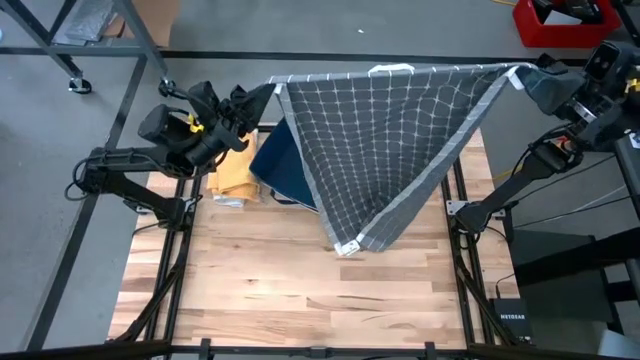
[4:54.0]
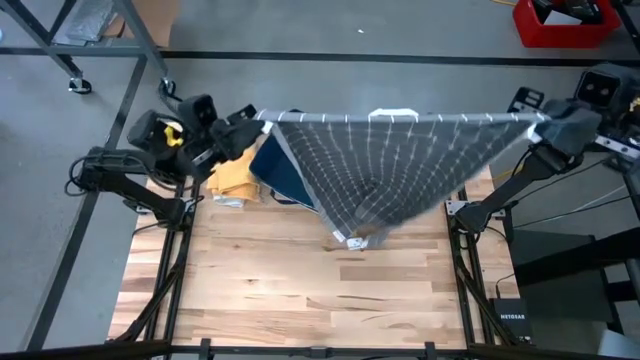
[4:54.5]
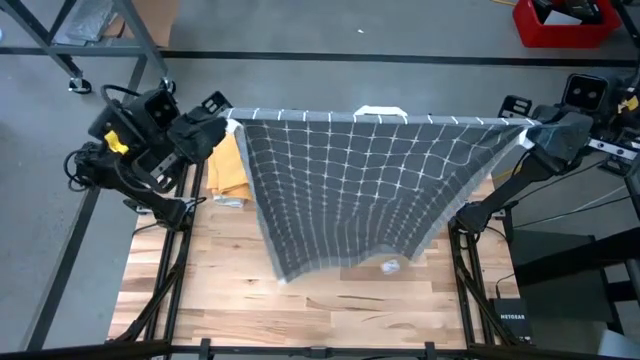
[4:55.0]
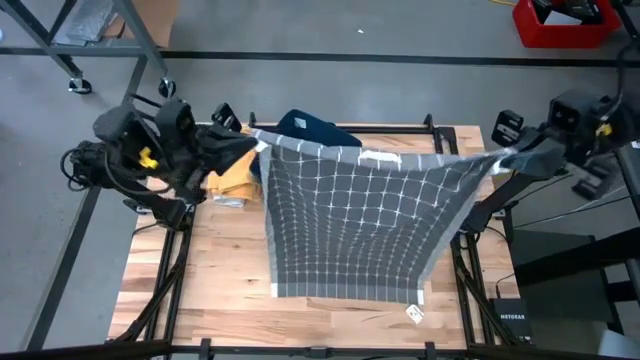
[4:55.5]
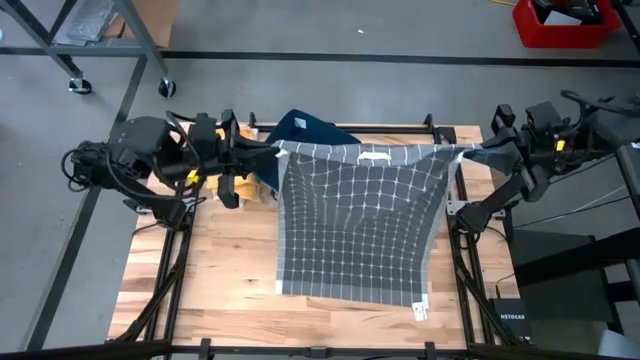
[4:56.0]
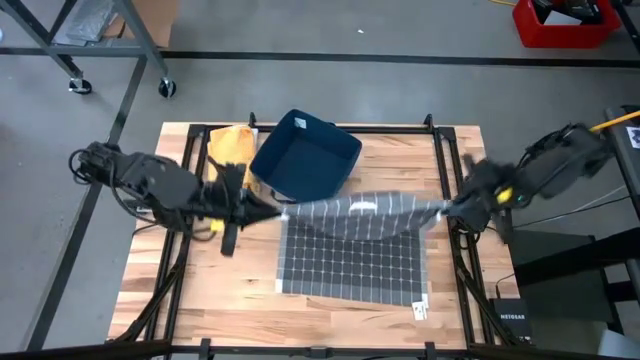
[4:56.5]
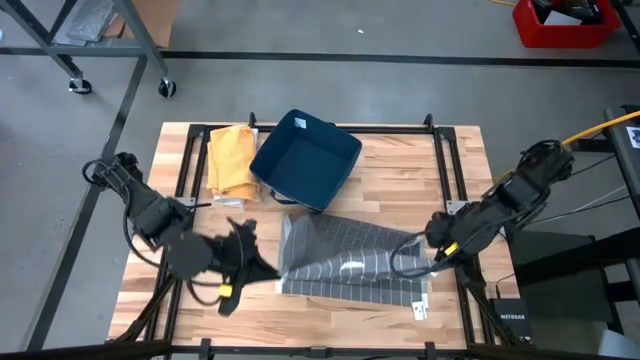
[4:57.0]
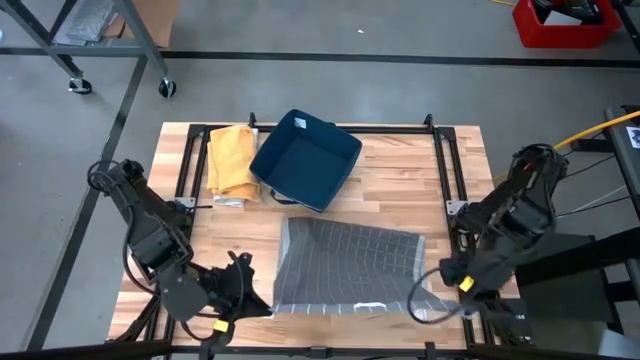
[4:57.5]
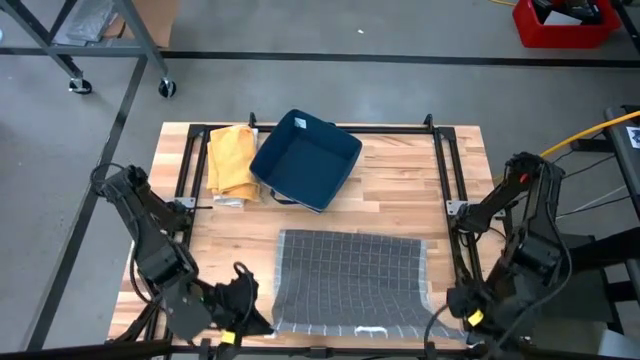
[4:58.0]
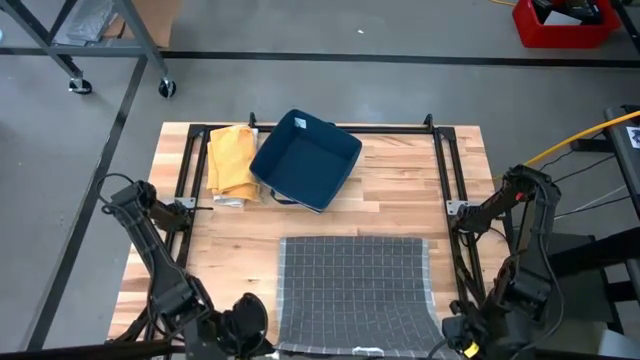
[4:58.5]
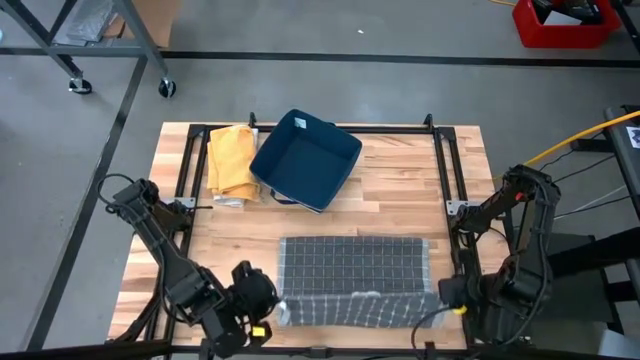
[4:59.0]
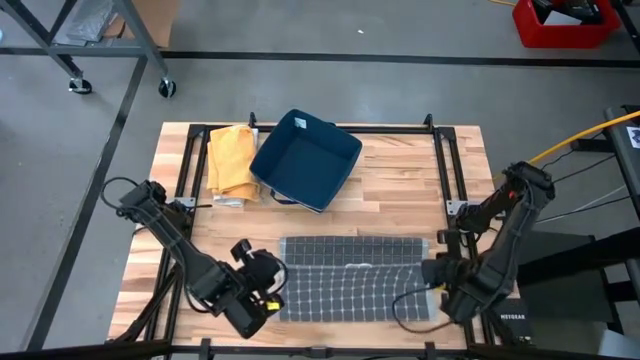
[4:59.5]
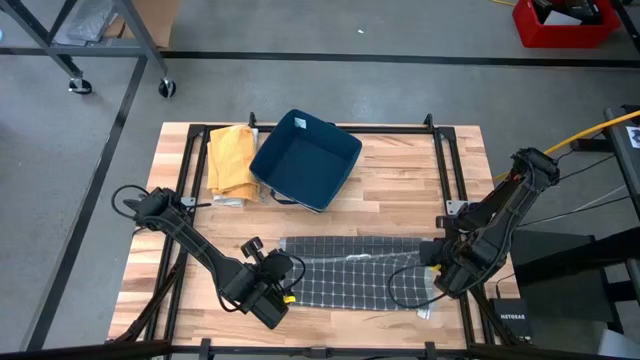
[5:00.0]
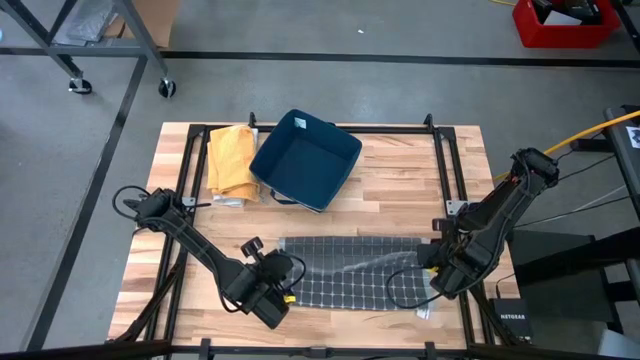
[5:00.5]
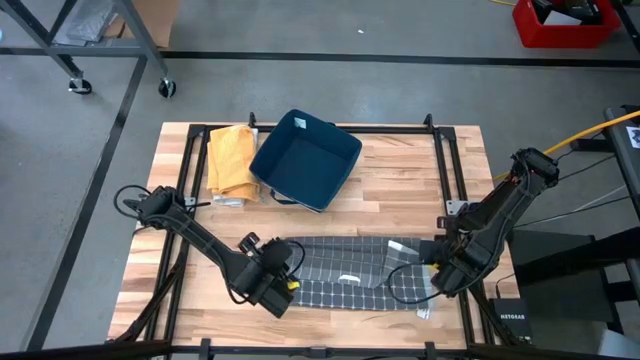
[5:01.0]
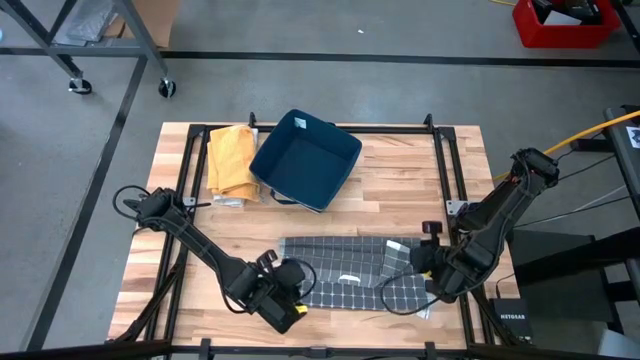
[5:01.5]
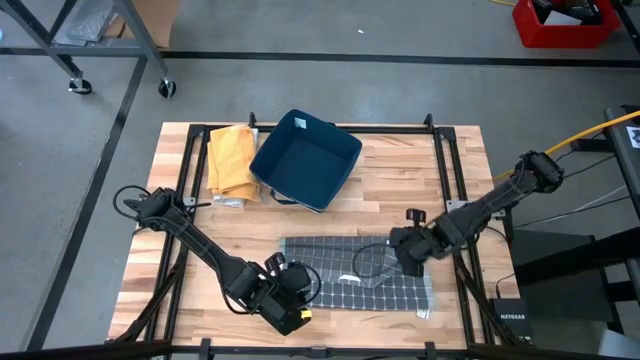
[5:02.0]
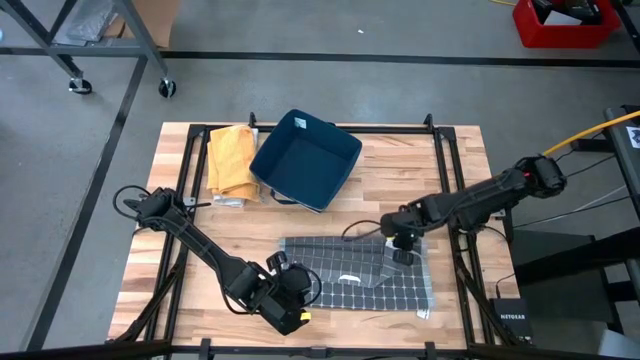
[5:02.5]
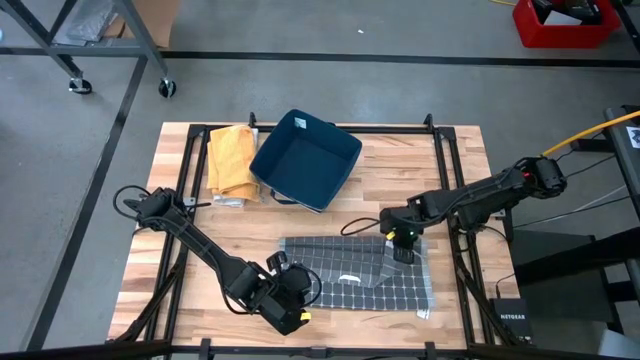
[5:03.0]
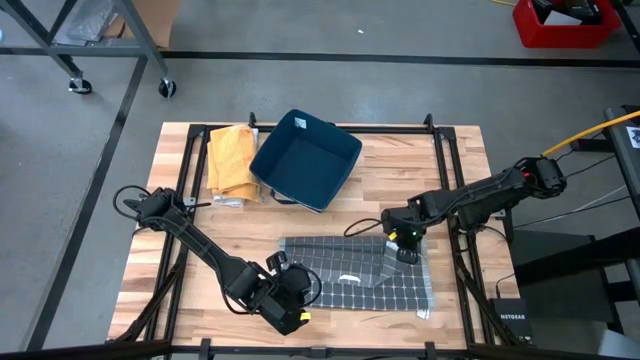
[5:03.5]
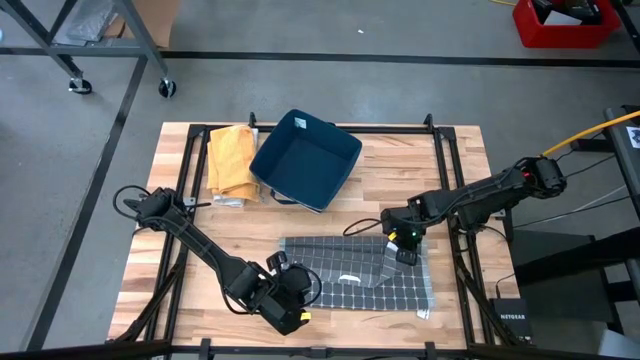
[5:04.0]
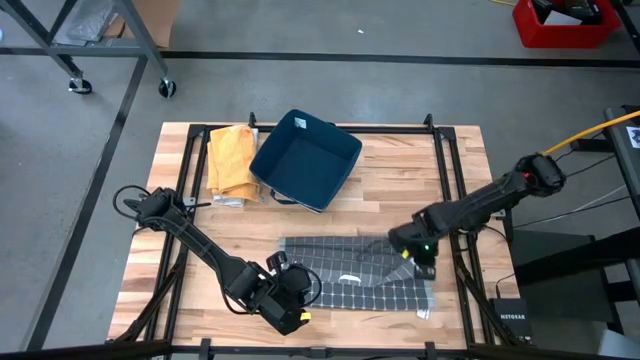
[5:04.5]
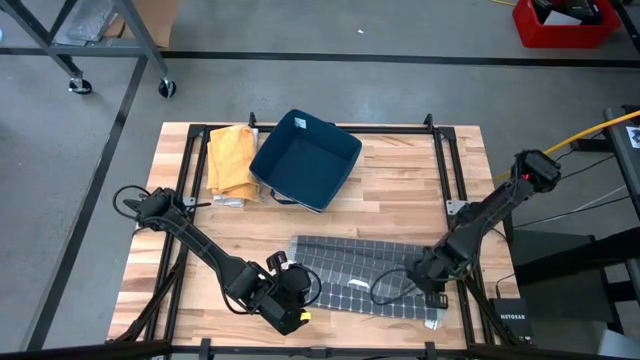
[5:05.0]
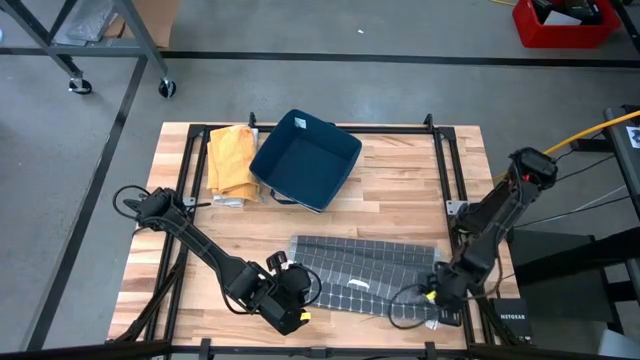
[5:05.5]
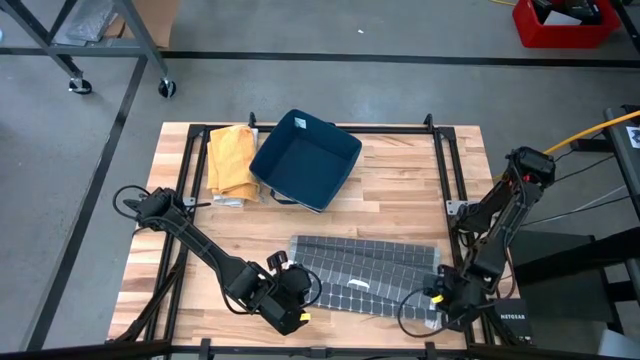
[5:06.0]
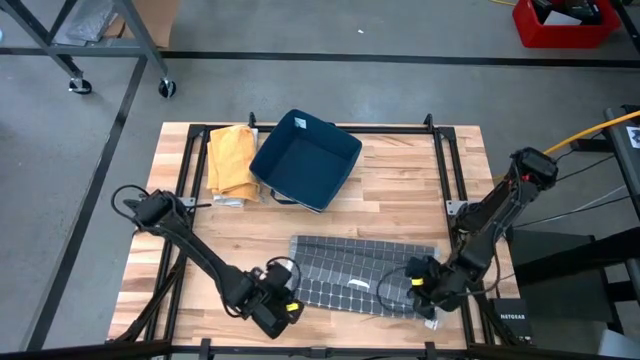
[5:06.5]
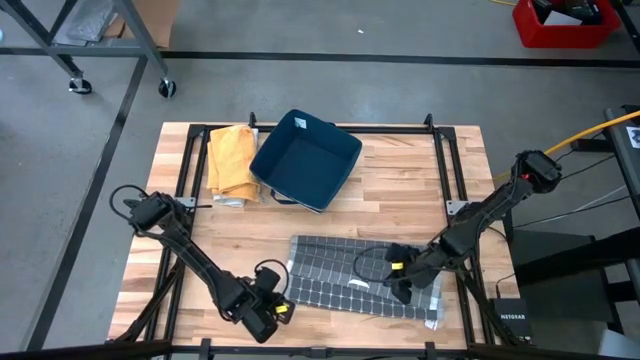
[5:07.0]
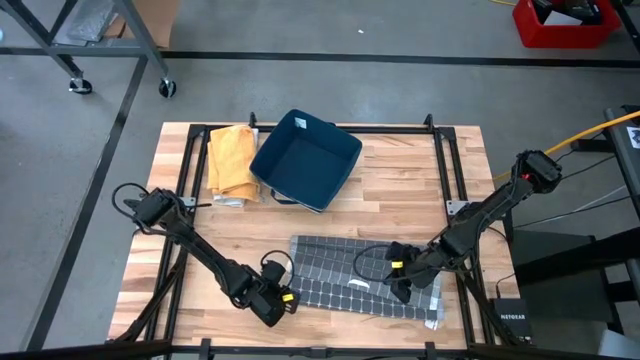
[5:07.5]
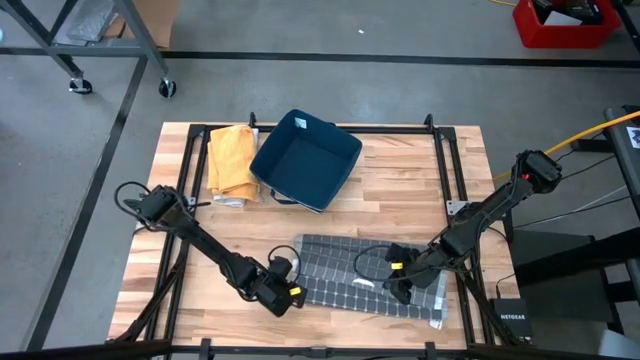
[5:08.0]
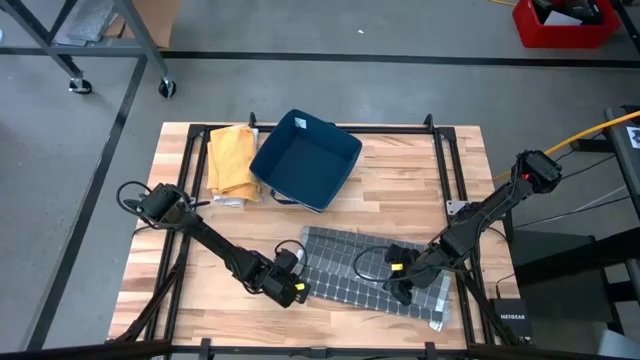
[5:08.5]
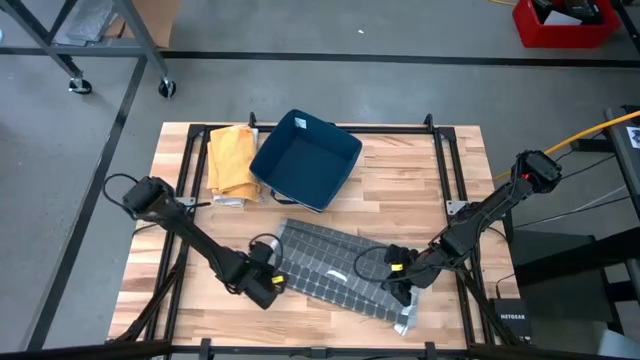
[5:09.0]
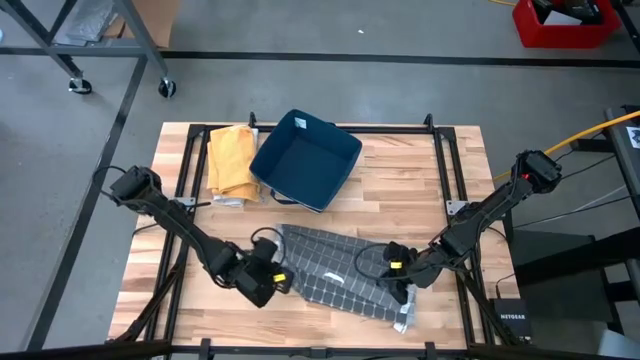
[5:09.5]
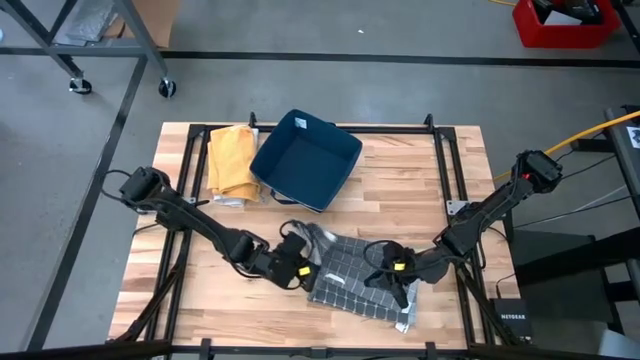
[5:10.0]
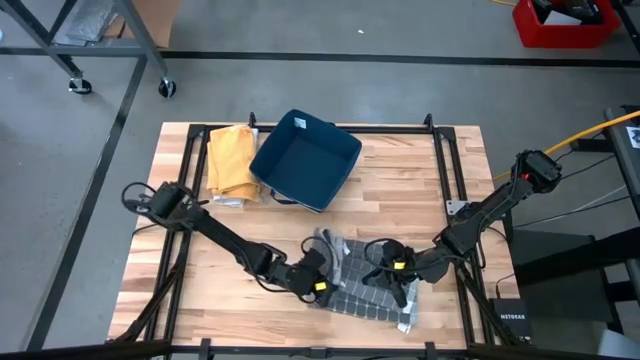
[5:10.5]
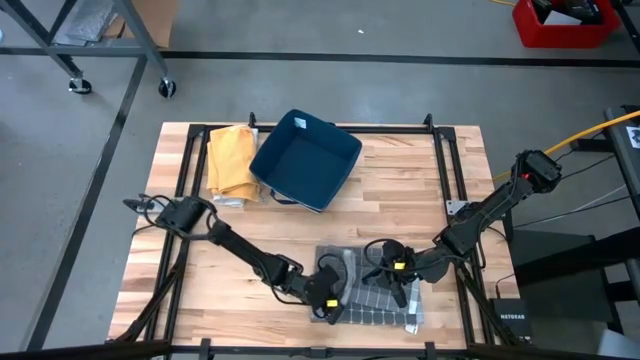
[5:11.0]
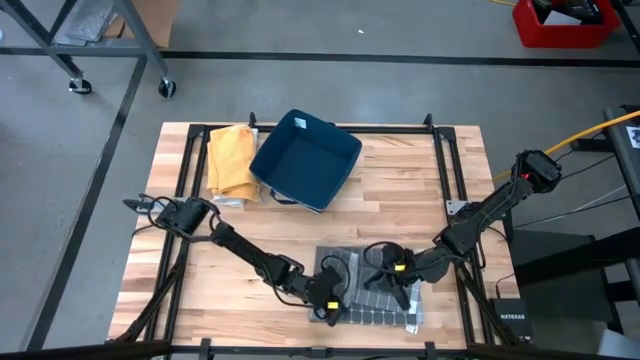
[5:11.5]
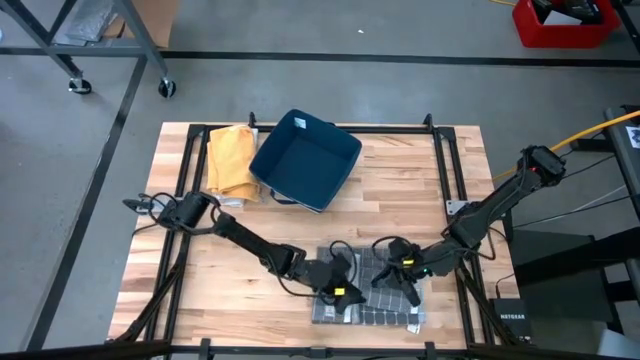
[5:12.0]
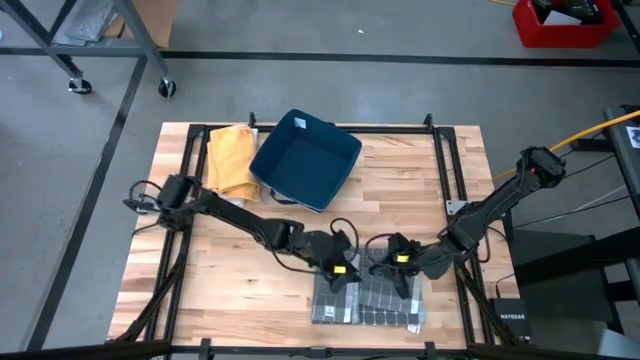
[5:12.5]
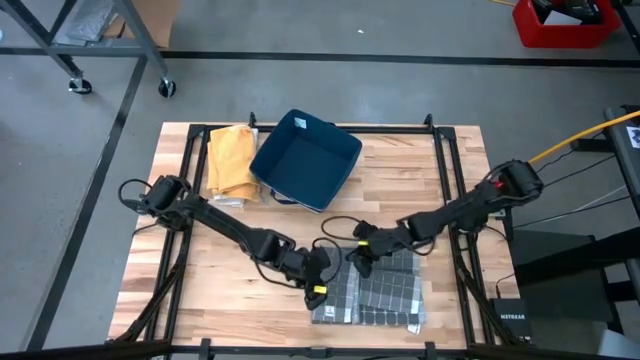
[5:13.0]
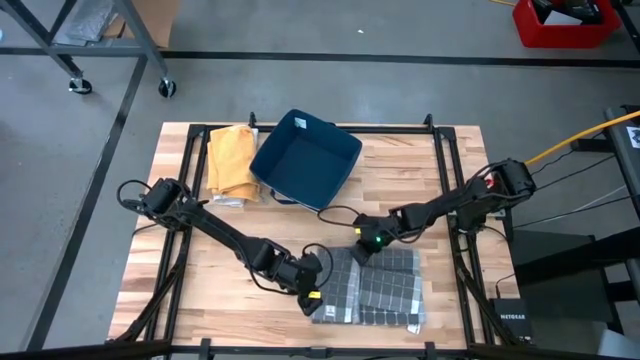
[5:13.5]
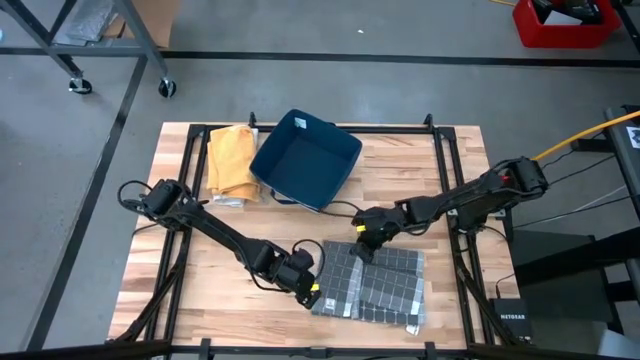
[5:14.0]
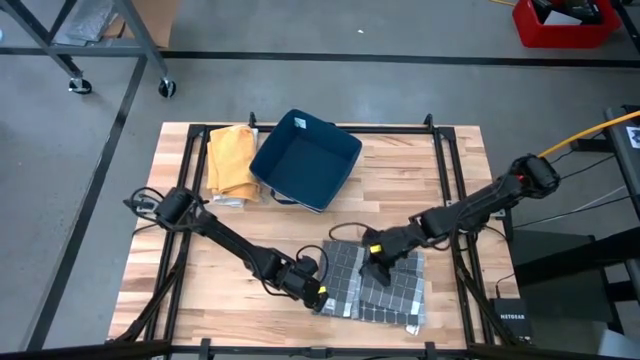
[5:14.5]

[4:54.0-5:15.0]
Task: Fold towel
Fold the gray patterned towel
